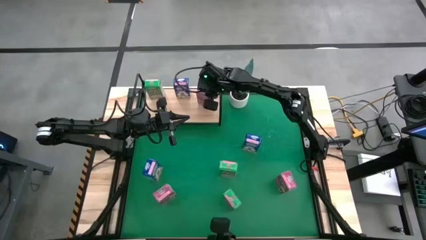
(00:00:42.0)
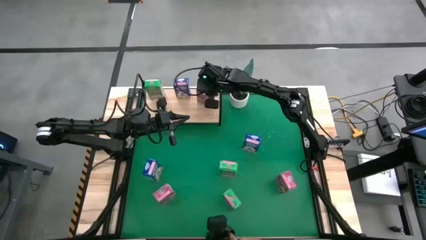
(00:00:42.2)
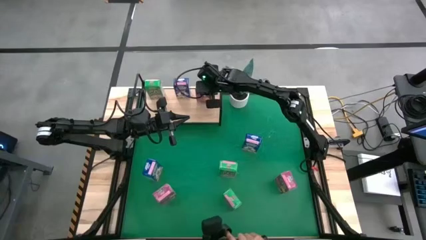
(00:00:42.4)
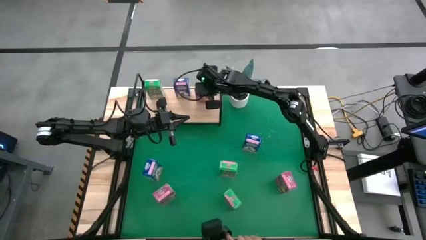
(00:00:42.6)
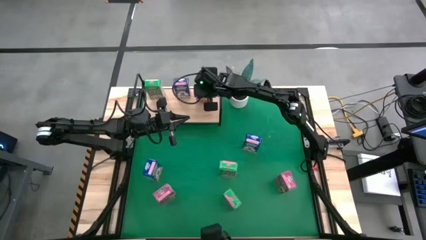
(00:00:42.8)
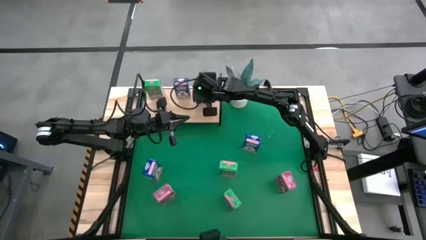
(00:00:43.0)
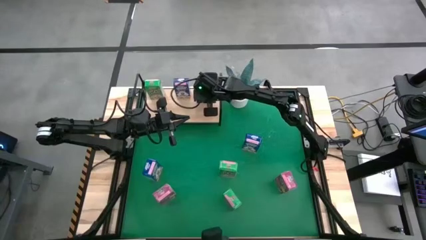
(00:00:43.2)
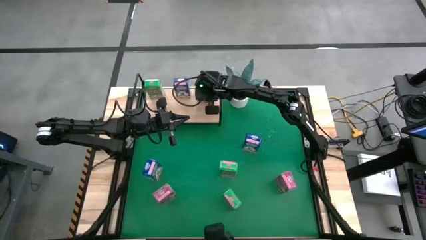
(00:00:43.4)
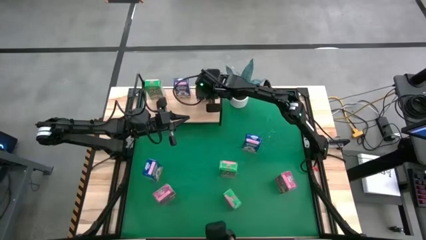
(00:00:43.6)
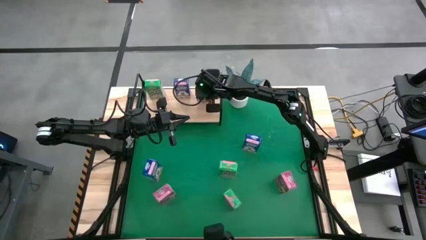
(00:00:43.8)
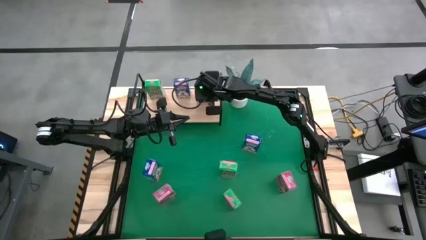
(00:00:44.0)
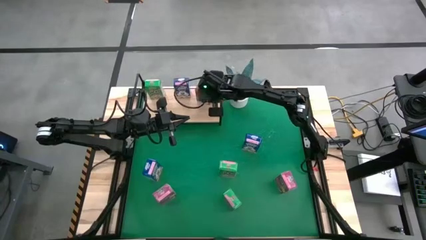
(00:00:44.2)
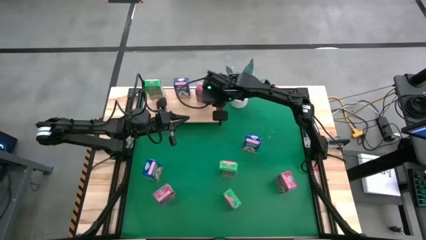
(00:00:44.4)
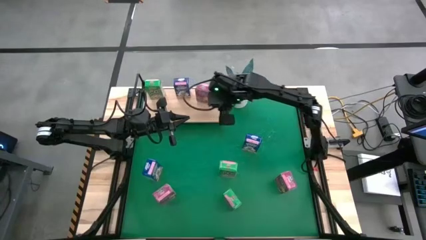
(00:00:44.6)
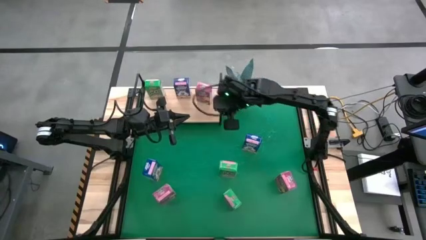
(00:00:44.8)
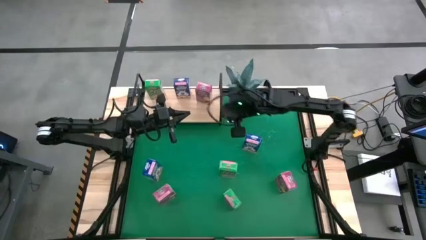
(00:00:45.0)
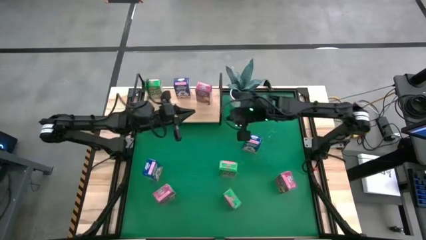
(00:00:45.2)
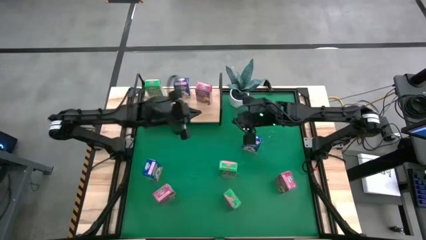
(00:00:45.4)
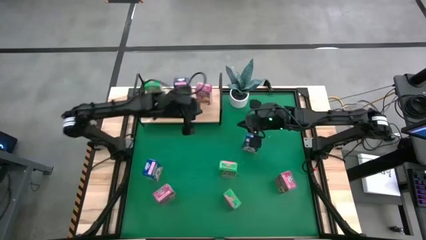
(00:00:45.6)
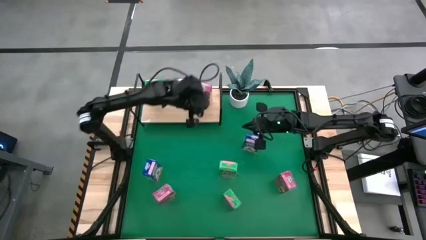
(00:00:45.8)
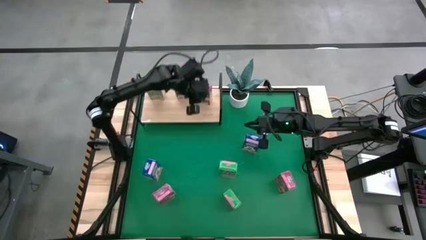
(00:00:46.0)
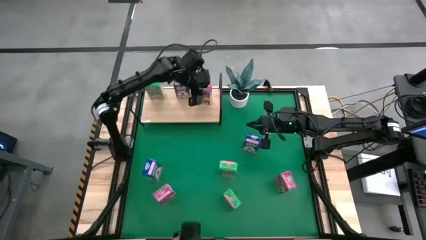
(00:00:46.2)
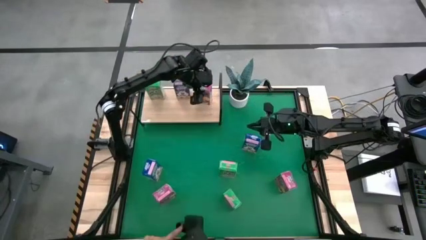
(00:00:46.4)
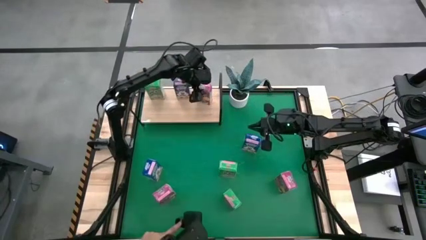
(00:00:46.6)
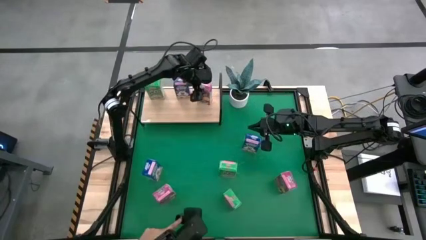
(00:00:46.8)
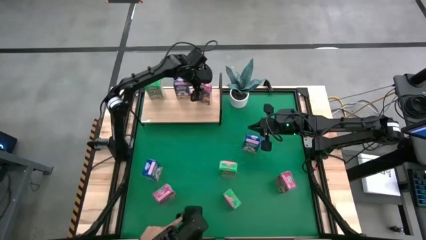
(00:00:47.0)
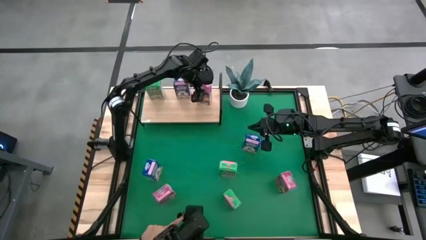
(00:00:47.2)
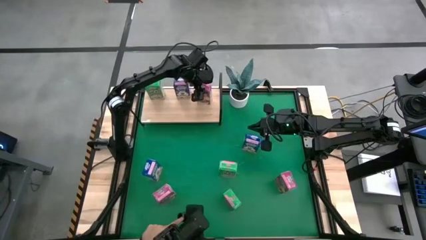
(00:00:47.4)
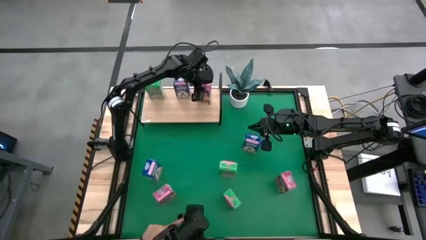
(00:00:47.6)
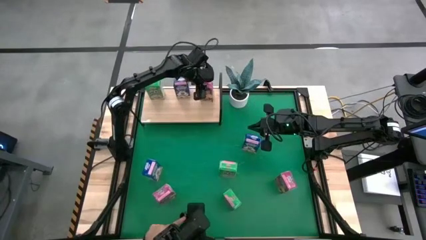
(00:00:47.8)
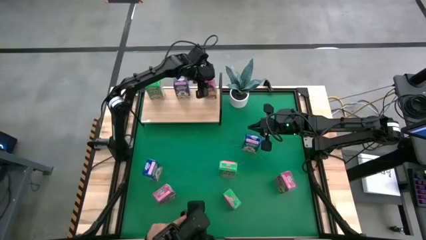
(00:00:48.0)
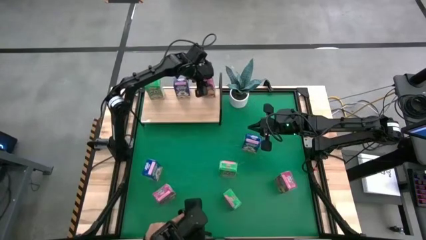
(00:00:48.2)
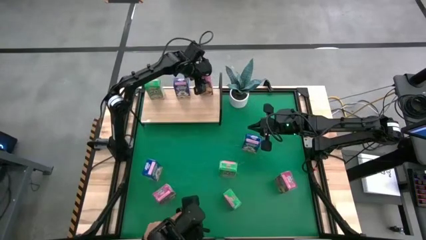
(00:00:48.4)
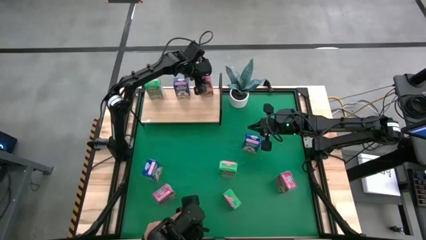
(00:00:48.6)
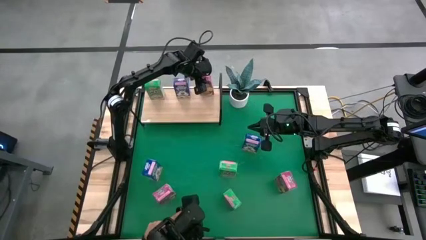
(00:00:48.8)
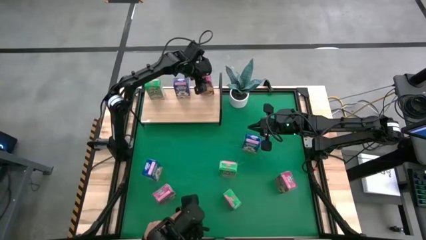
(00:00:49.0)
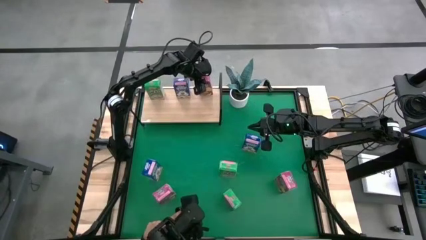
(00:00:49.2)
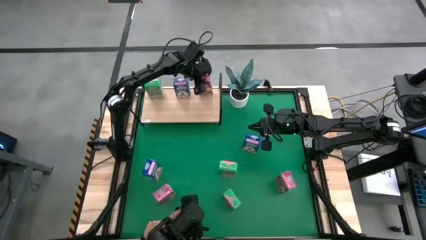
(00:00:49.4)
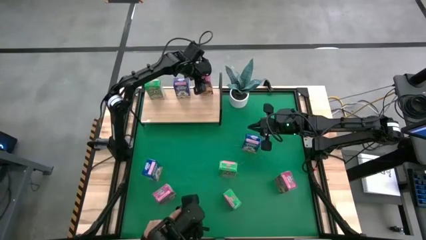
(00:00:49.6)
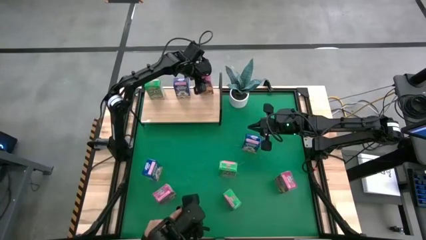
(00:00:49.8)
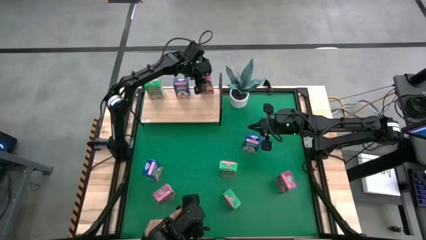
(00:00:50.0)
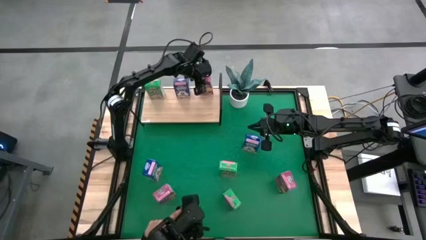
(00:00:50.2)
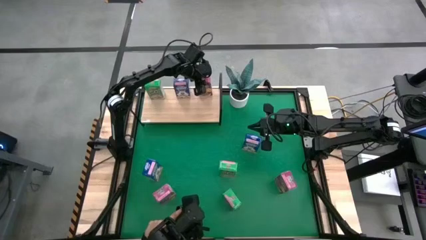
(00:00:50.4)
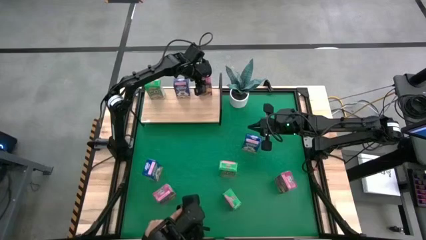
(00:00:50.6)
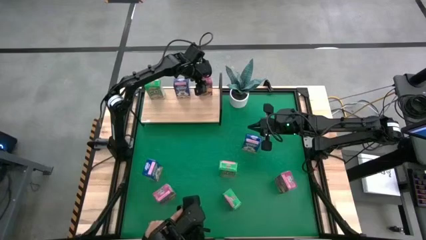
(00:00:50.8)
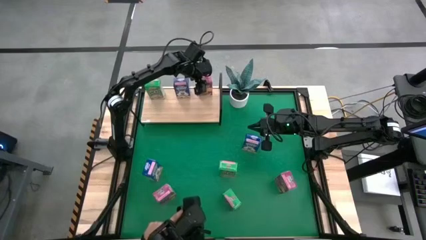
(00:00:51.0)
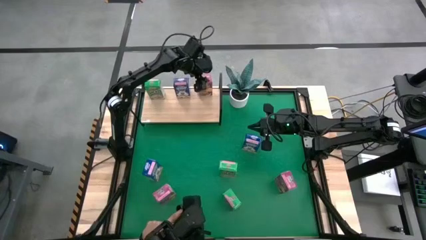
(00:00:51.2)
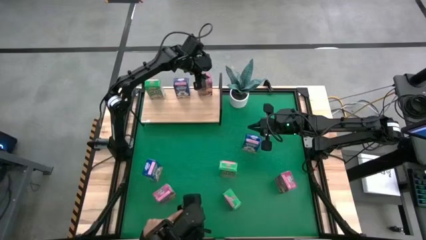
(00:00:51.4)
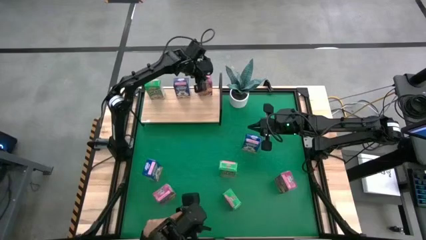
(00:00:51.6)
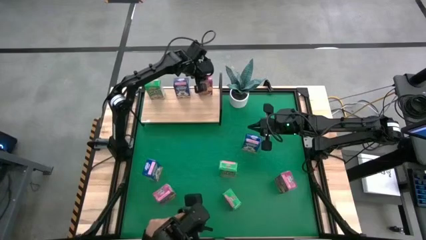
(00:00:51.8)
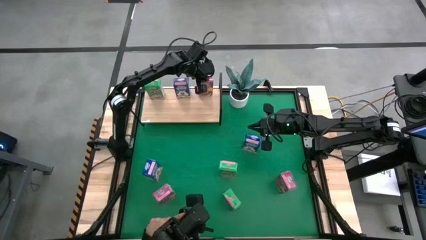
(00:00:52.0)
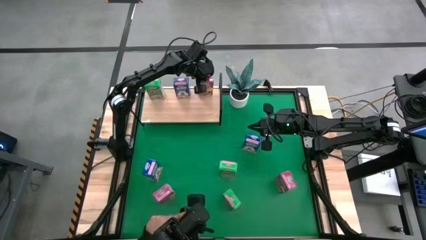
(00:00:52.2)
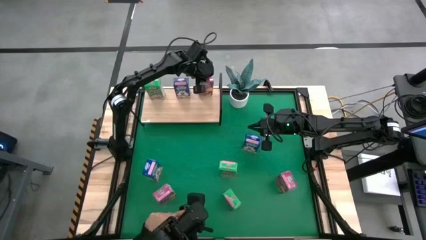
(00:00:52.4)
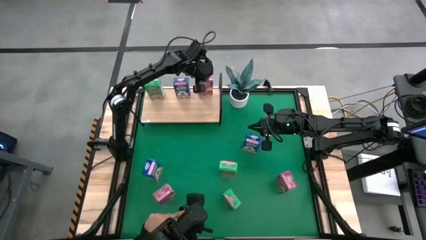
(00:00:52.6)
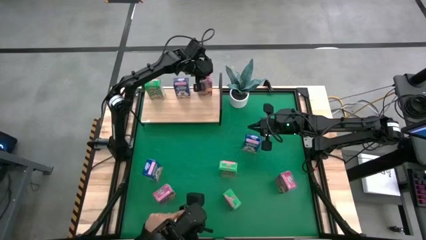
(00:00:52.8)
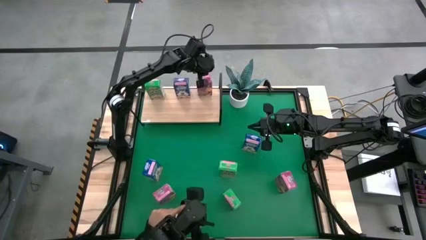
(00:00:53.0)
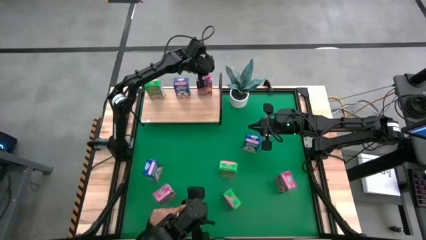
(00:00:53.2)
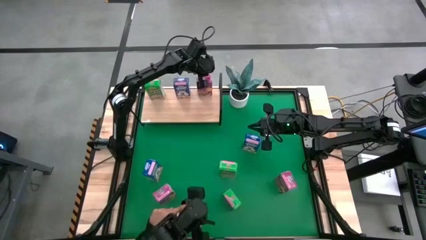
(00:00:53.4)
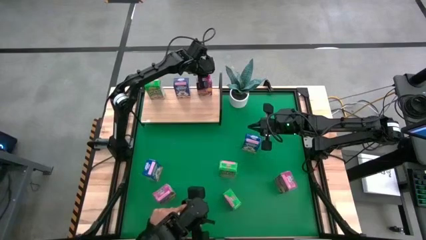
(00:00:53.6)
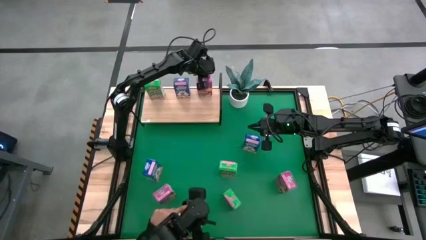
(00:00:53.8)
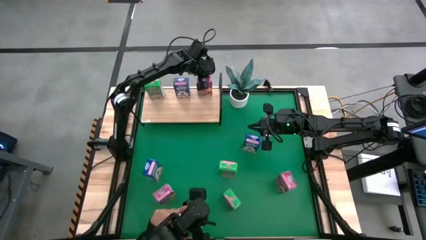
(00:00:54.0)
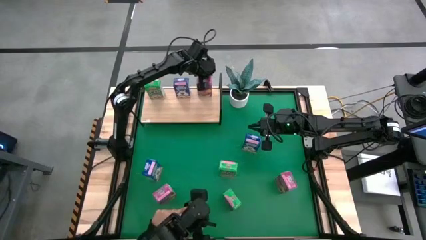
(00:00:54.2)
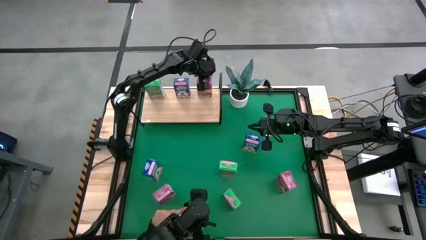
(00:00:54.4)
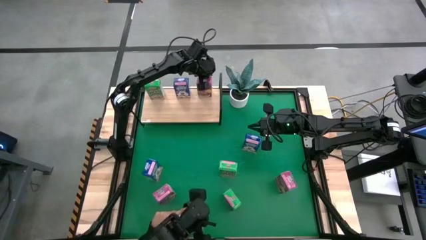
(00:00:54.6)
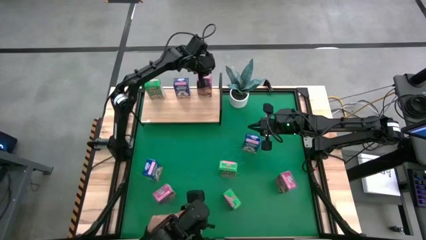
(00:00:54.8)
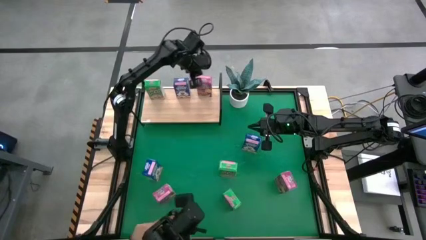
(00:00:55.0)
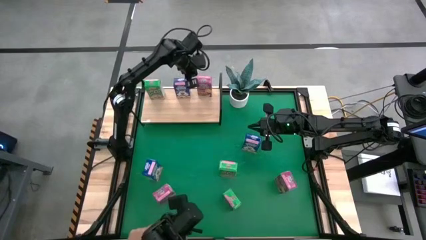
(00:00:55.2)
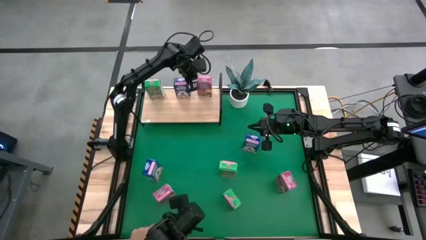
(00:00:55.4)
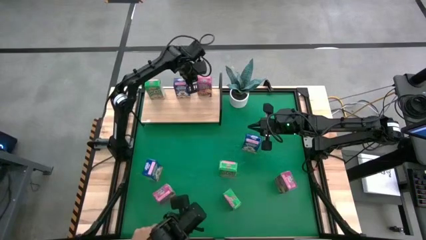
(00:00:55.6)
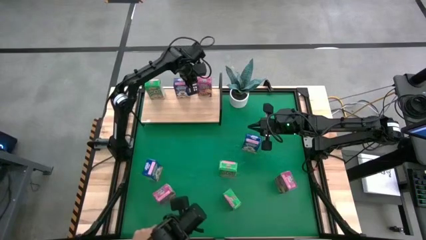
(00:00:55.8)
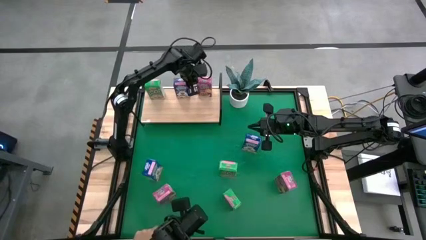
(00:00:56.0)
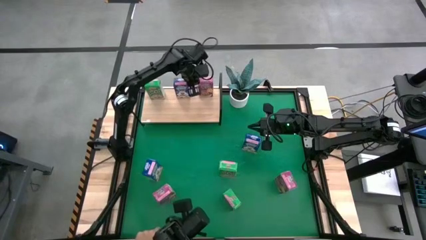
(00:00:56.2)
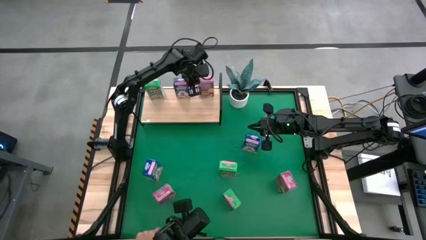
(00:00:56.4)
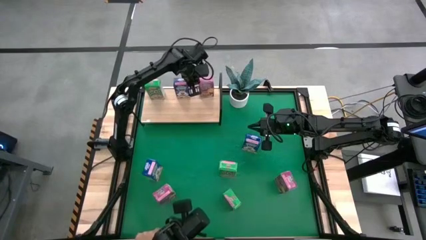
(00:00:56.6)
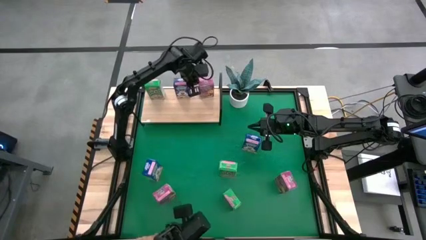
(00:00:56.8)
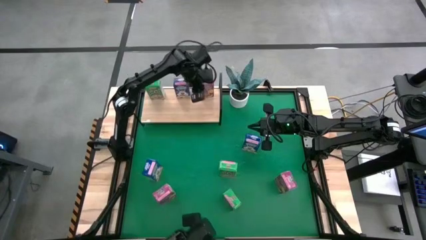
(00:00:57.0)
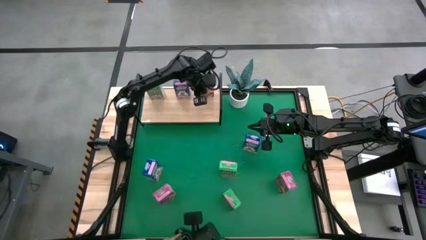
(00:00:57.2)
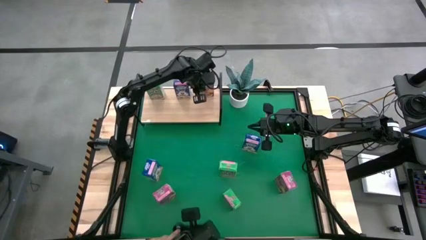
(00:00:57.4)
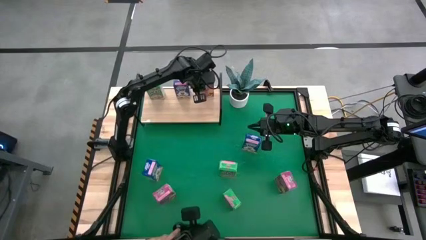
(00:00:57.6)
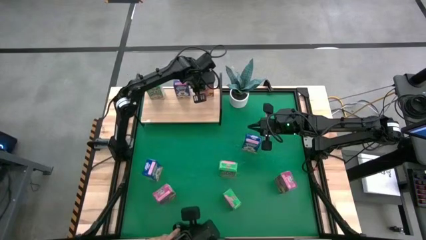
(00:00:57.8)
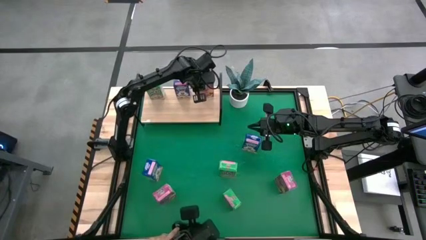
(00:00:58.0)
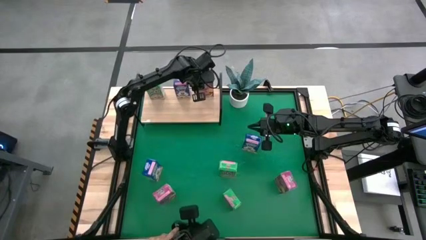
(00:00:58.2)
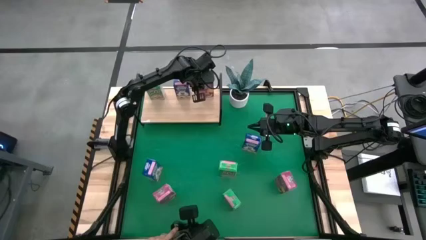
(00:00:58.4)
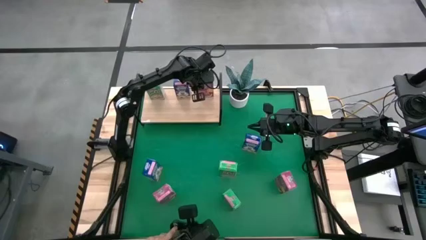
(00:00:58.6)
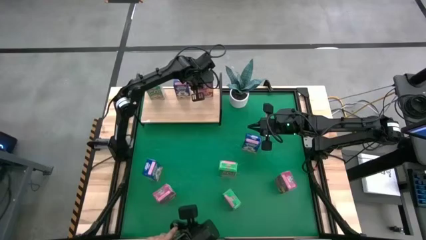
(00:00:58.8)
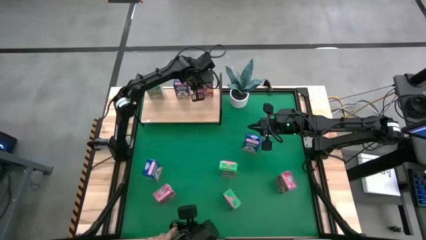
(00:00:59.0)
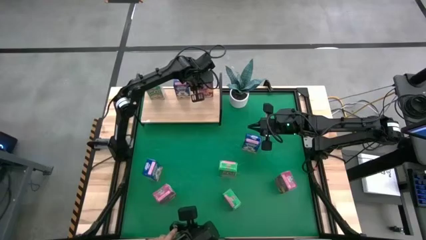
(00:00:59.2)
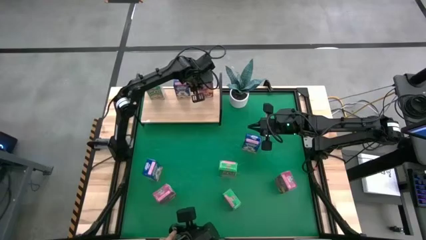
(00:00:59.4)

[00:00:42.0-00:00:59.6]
Task: Stack cereal on shelf
Put the top pink cereal box on the shelf
